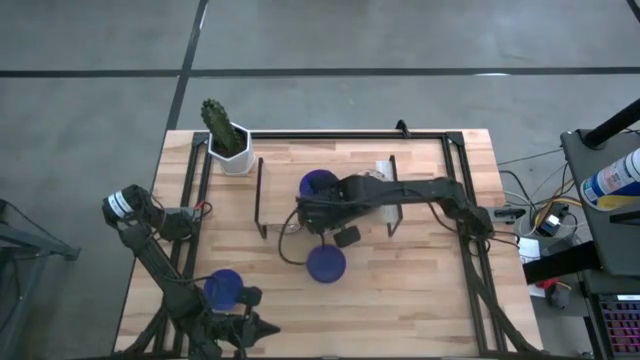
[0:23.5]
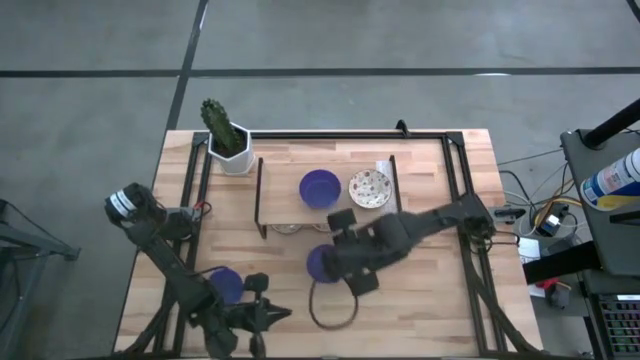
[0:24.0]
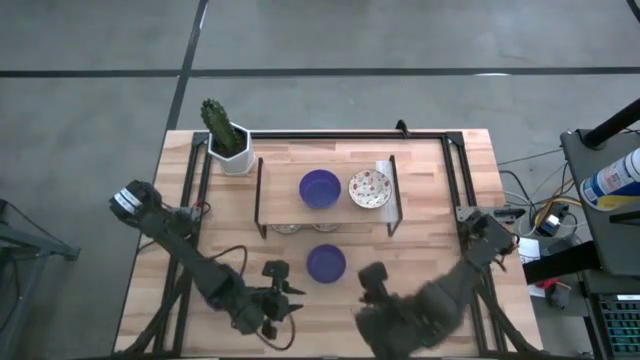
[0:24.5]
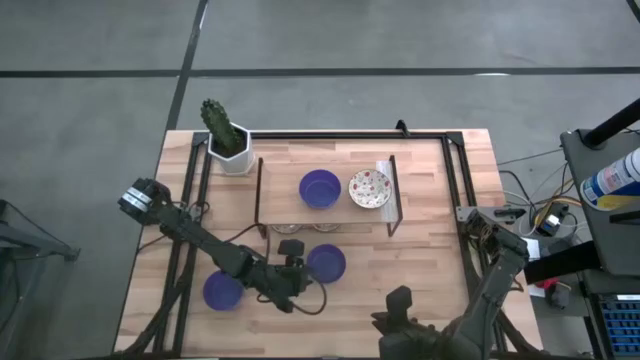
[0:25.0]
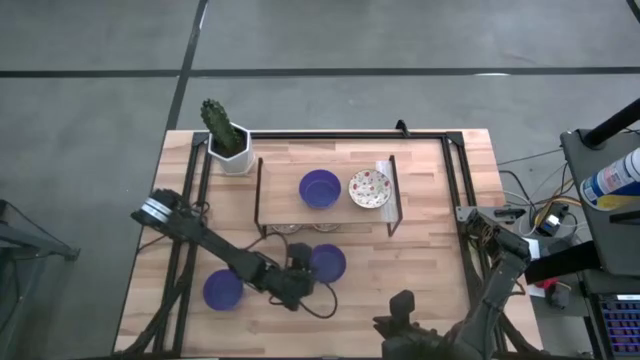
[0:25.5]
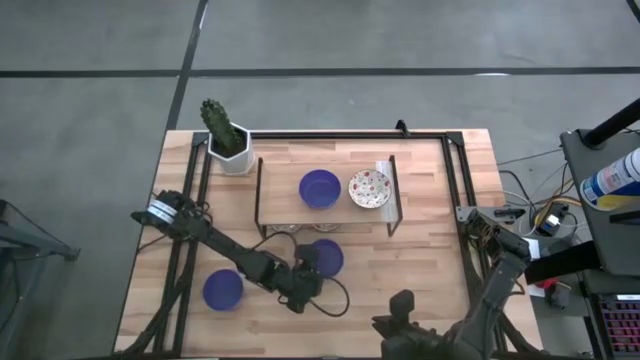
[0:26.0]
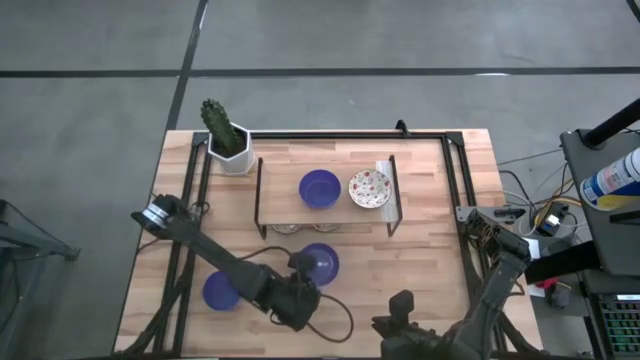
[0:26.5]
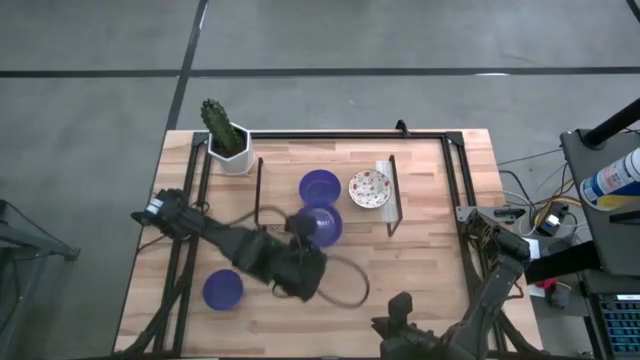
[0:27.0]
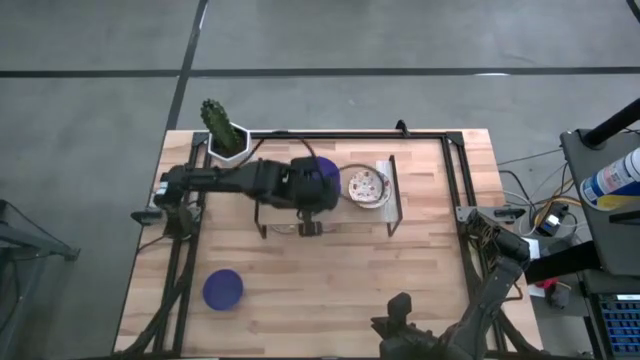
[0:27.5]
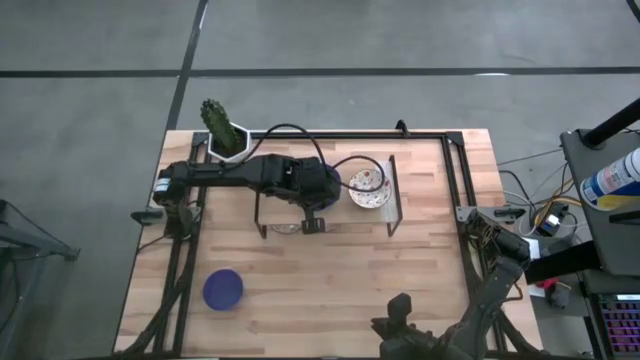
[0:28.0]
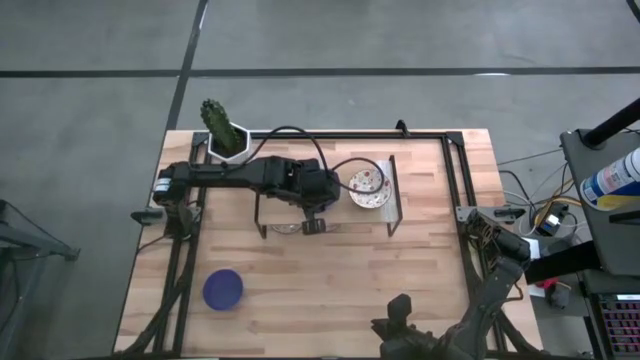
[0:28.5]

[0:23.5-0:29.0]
Task: Pick & Place Mini bowls
Stack the right blue bowl on the blue bowl on the shelf

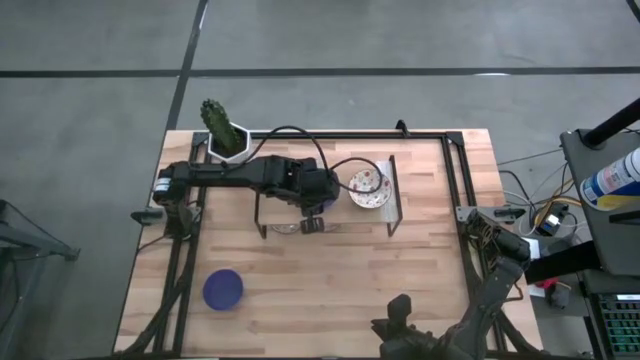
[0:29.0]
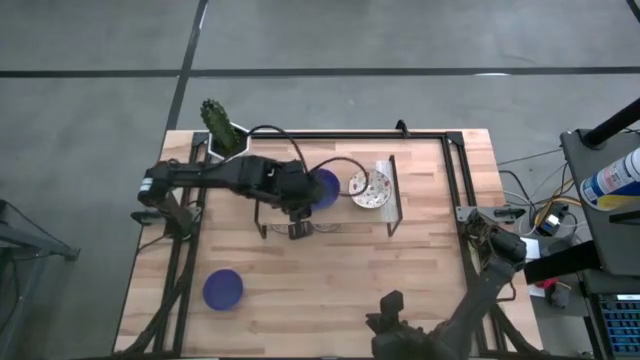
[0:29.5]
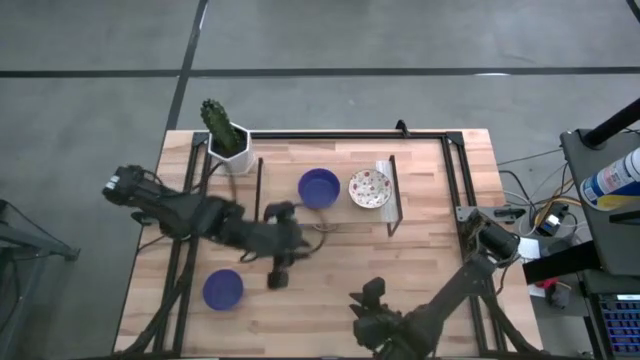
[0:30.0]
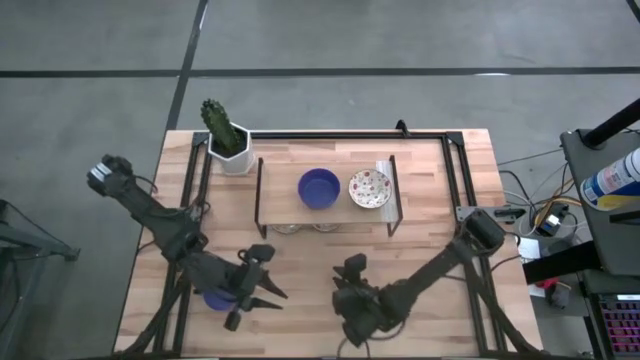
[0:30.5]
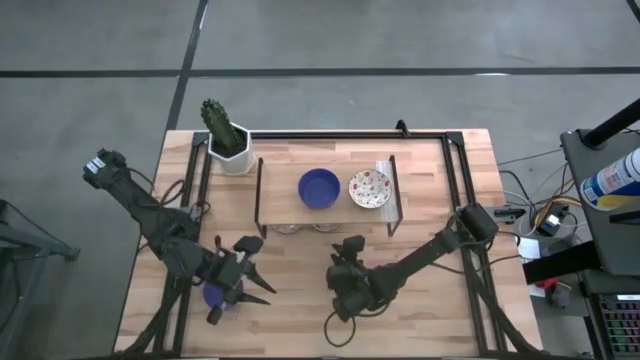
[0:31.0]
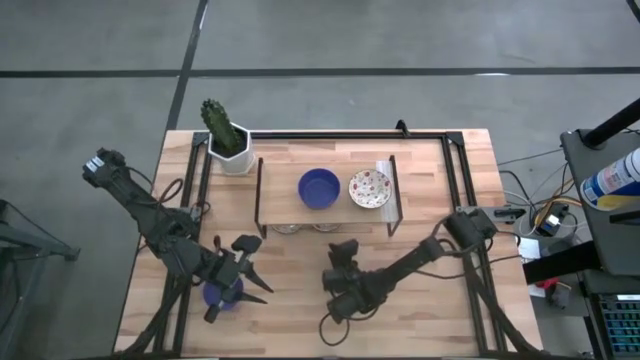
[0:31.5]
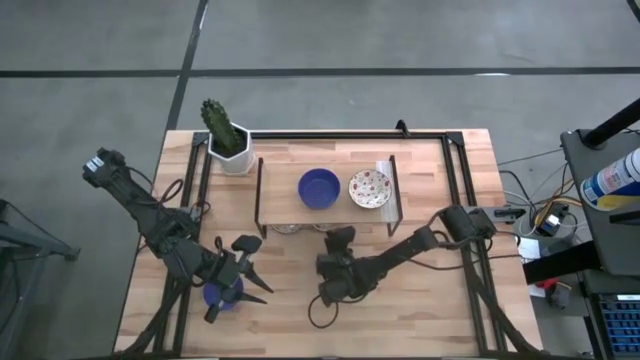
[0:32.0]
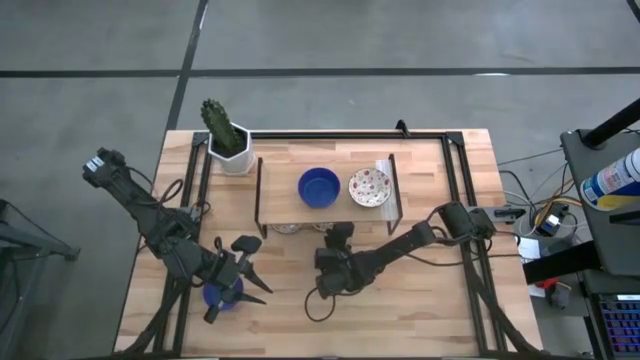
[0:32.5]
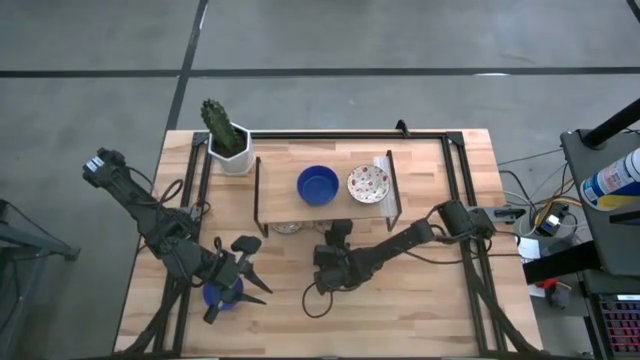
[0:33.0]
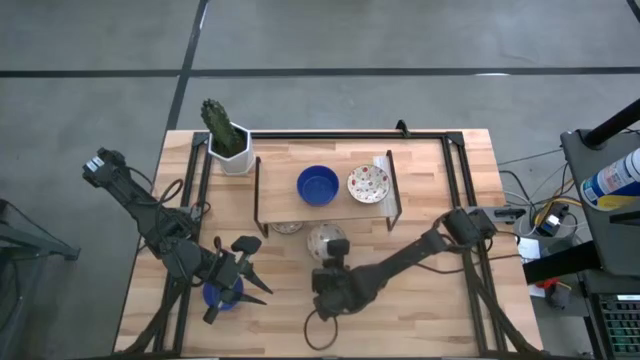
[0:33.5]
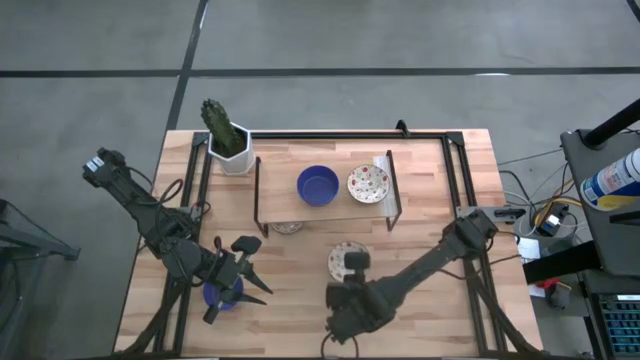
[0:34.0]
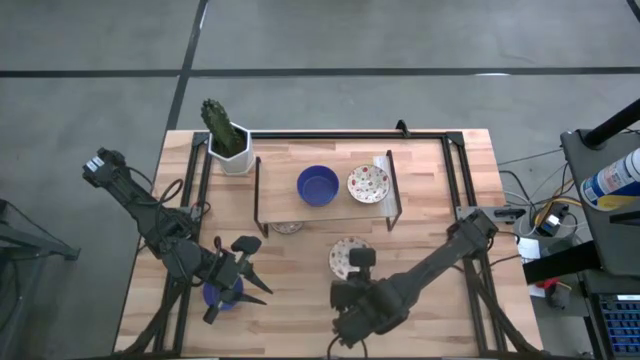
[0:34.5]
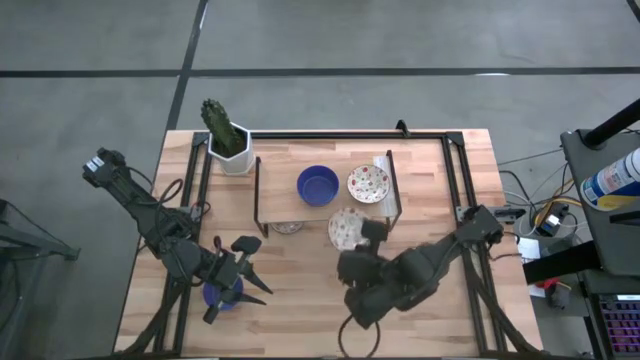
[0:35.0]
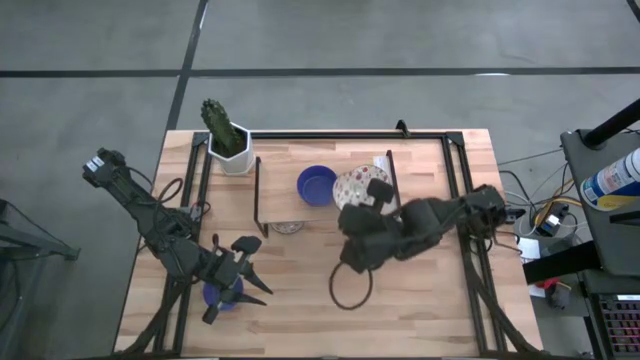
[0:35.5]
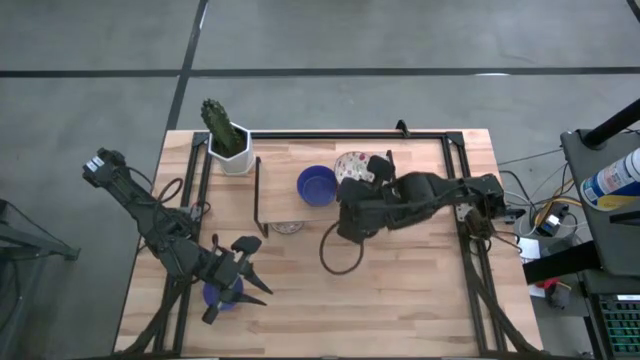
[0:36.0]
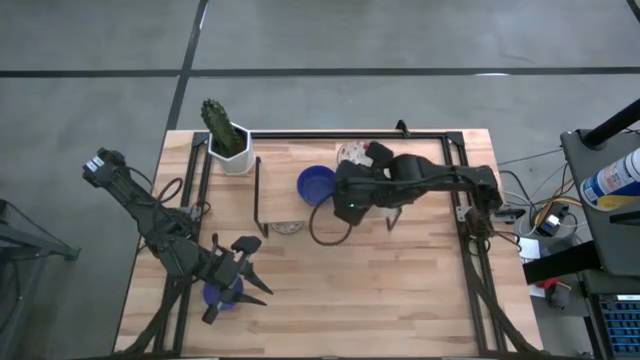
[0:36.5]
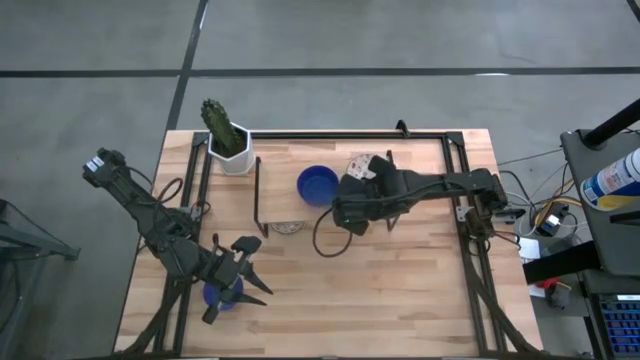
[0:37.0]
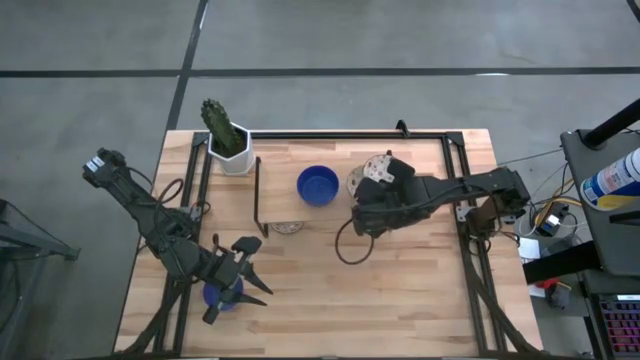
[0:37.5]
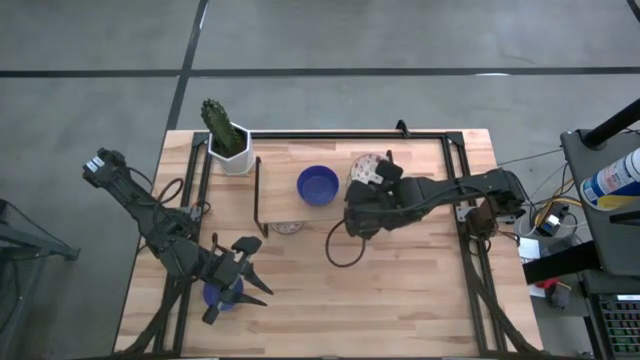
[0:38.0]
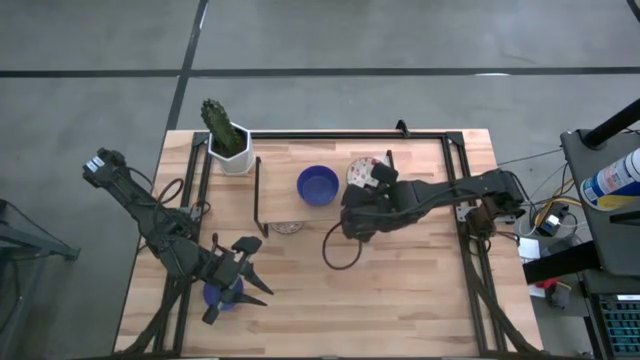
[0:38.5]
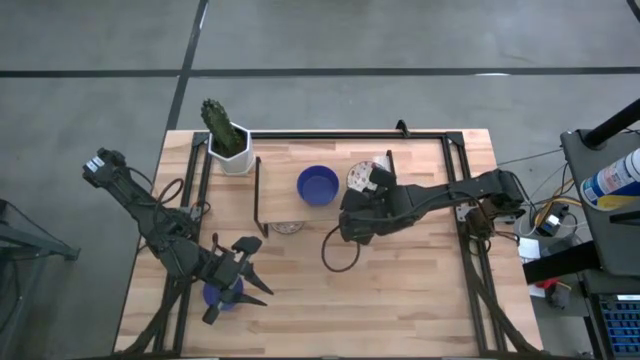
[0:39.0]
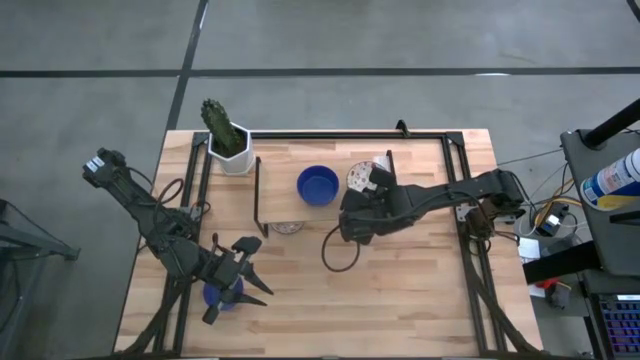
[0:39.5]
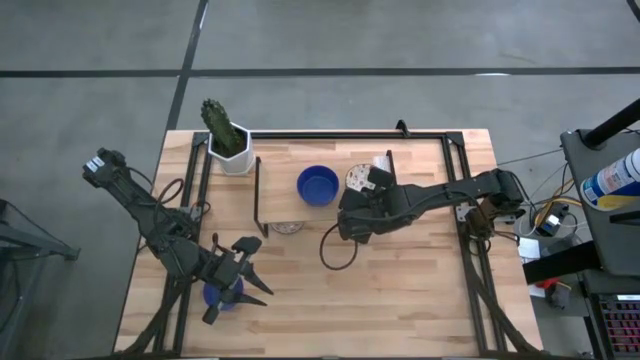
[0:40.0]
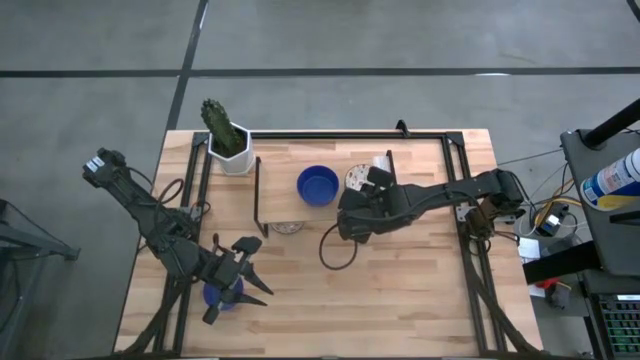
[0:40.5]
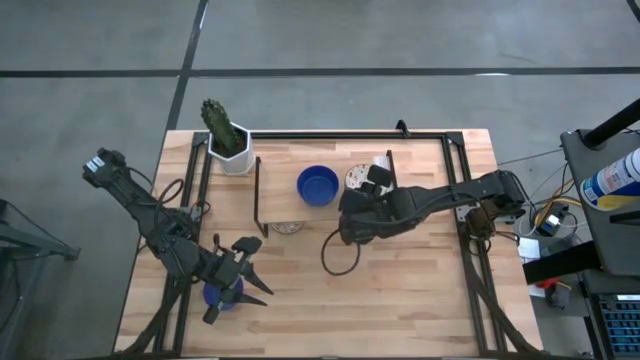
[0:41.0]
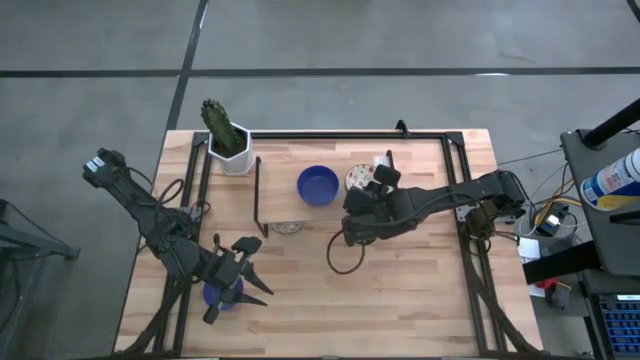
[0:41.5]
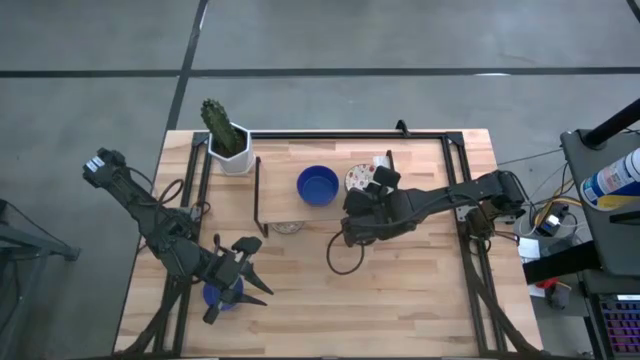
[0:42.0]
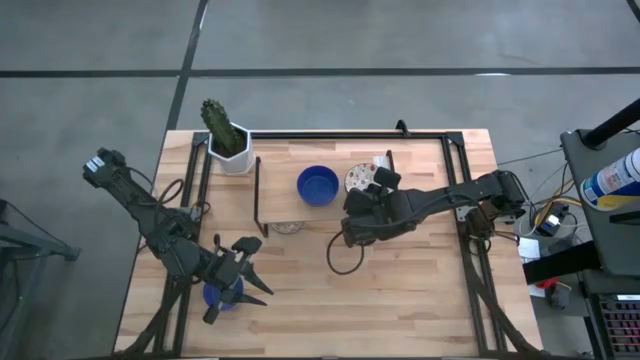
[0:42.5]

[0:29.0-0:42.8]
Stack the right red and white bowl on the red and white bowl on the shelf
